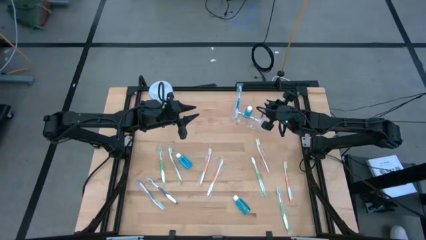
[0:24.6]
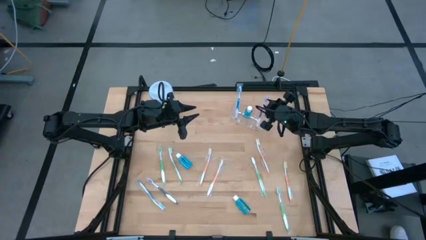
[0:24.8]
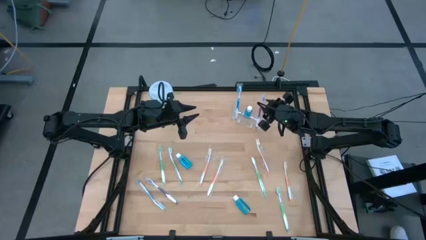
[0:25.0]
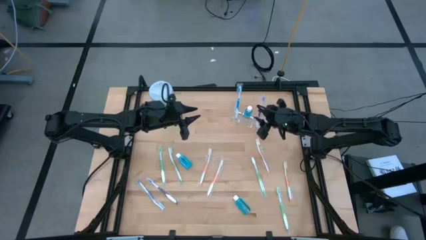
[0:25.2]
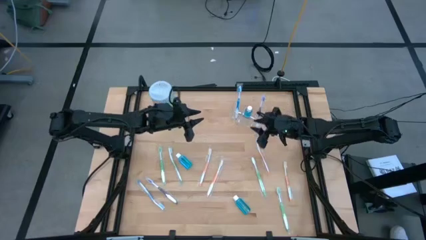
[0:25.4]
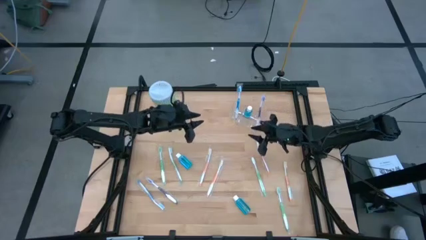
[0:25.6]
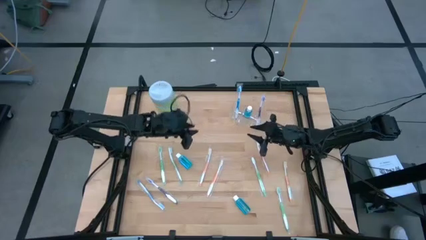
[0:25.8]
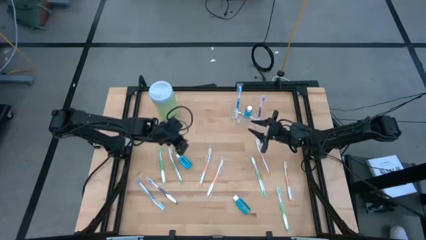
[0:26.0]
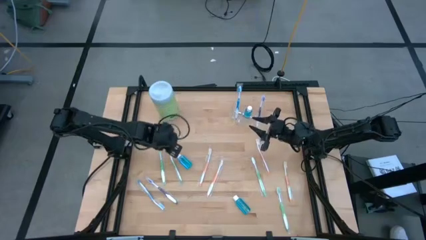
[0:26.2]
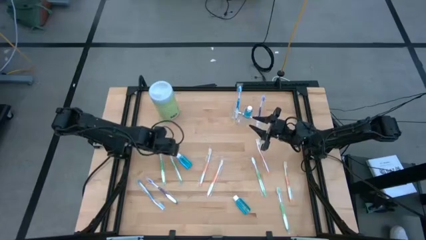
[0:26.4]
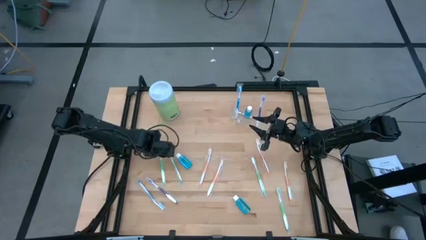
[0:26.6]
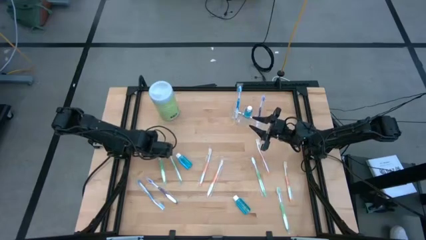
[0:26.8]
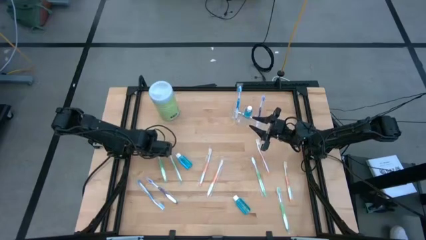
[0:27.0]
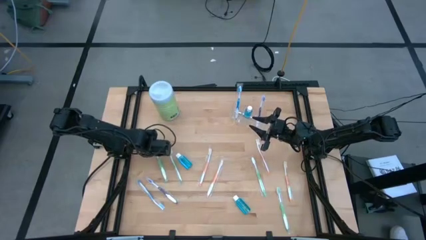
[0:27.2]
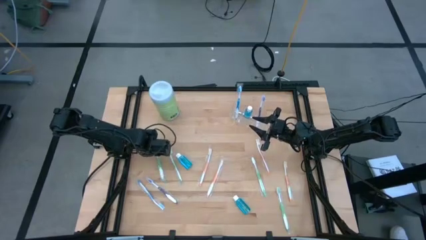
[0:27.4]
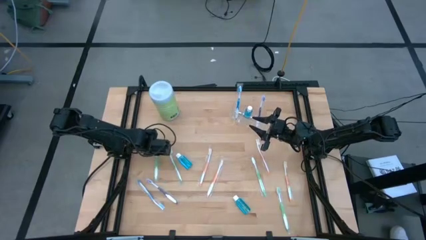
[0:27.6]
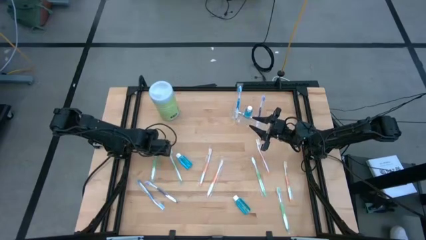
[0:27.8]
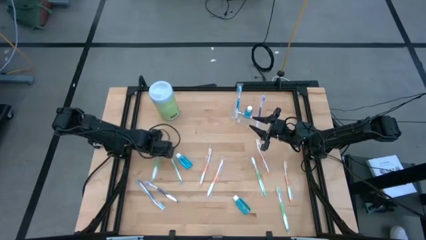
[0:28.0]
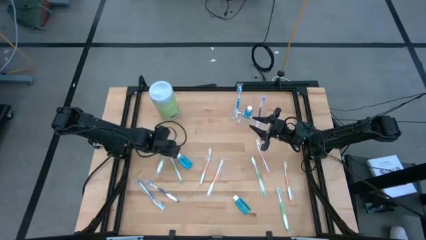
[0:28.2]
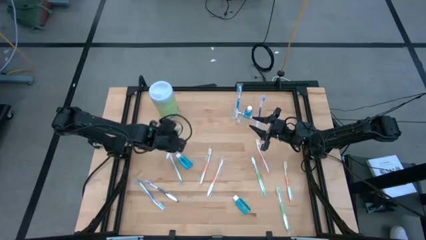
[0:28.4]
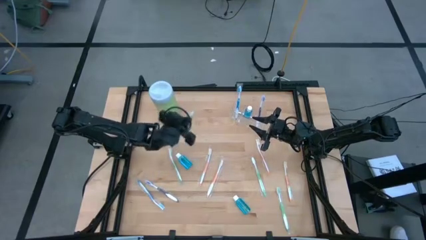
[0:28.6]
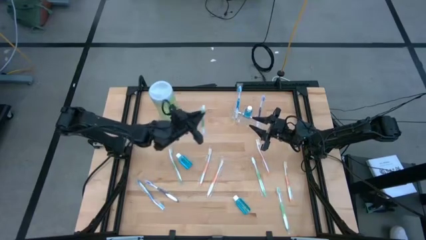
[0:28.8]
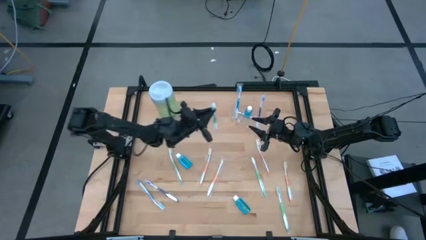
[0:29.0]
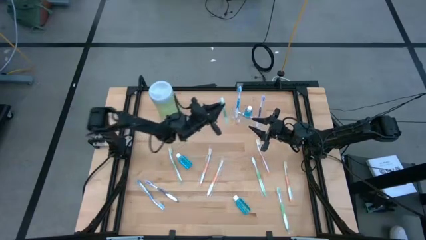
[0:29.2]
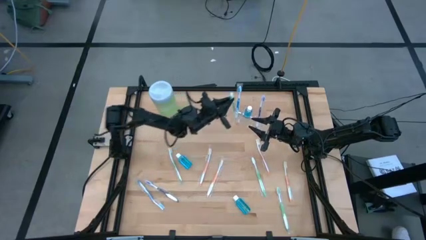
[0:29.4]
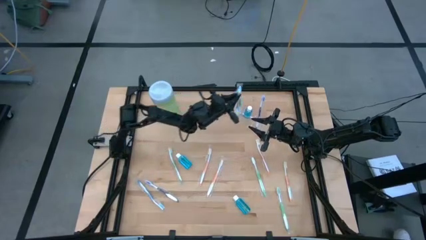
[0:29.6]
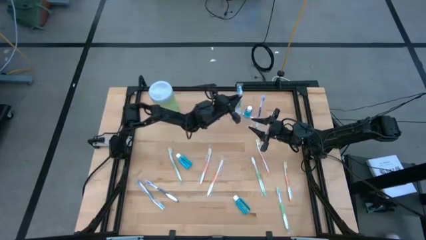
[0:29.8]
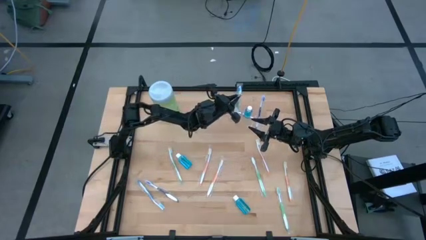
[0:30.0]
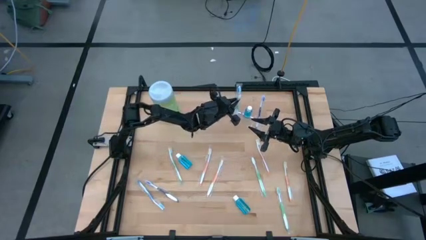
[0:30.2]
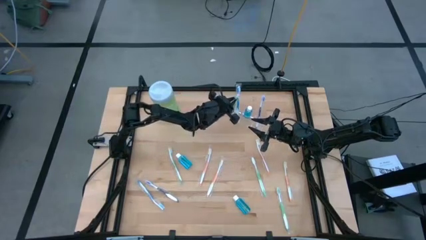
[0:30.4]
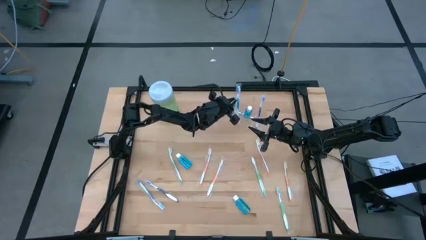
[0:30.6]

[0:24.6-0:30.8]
Task: Pick & Place toothbrushing station
Put the green toothbrush into the transparent organizer

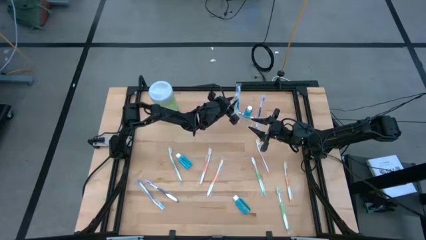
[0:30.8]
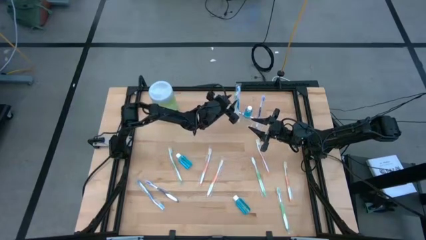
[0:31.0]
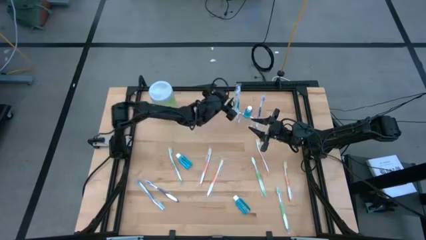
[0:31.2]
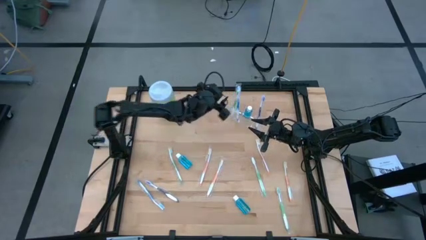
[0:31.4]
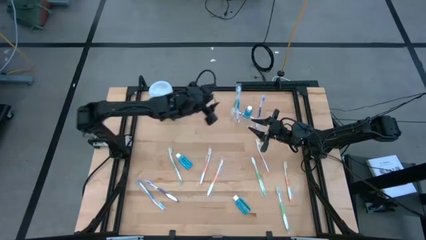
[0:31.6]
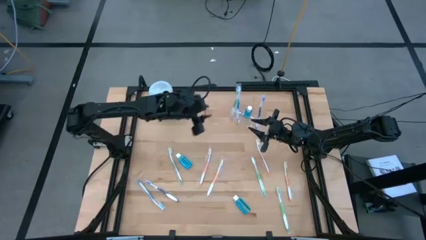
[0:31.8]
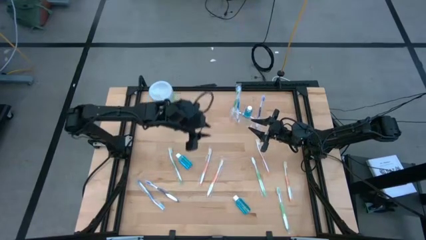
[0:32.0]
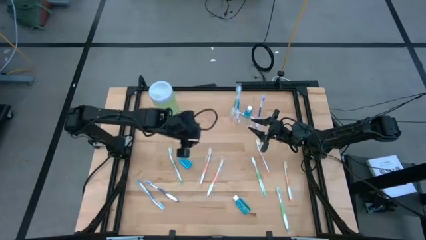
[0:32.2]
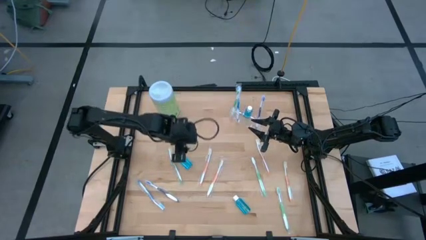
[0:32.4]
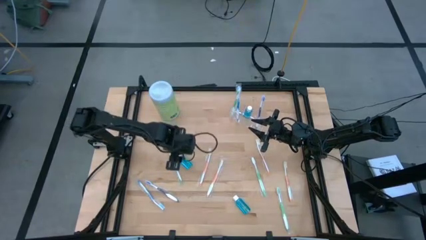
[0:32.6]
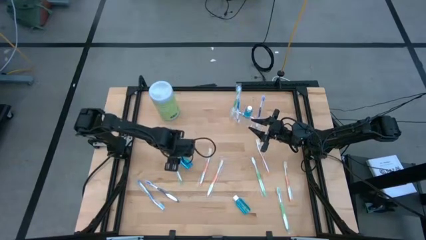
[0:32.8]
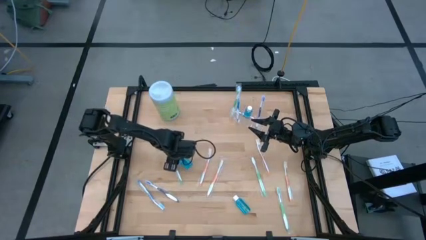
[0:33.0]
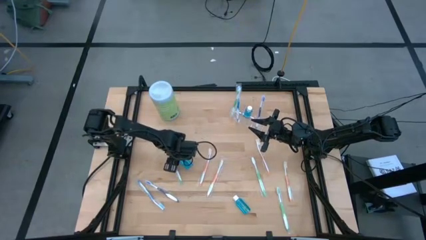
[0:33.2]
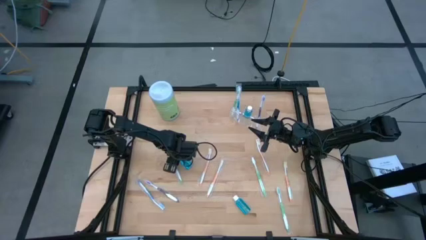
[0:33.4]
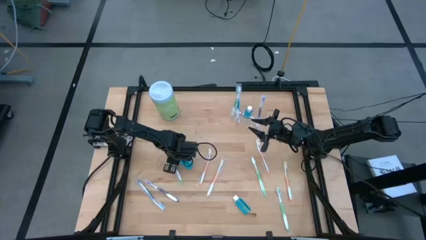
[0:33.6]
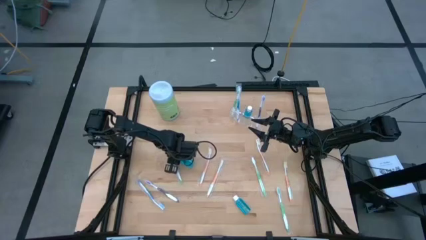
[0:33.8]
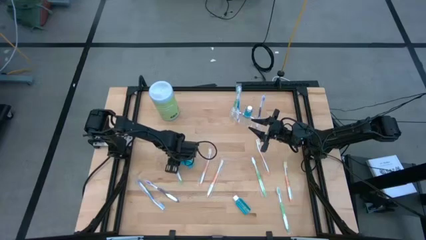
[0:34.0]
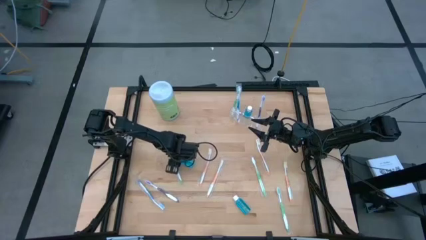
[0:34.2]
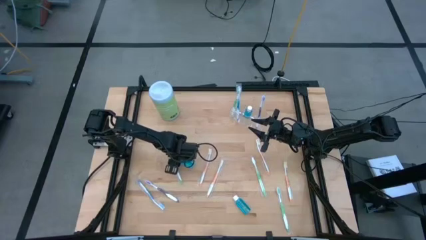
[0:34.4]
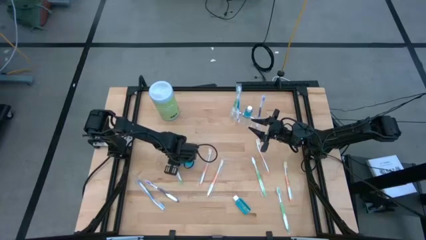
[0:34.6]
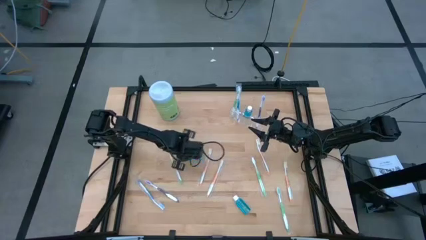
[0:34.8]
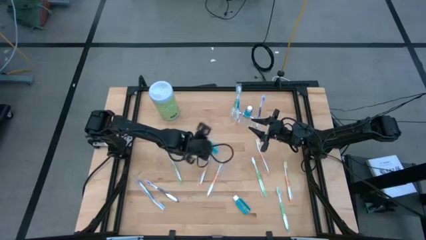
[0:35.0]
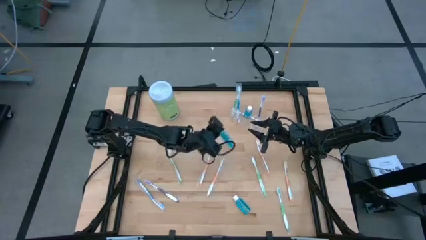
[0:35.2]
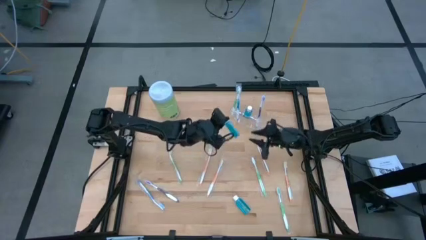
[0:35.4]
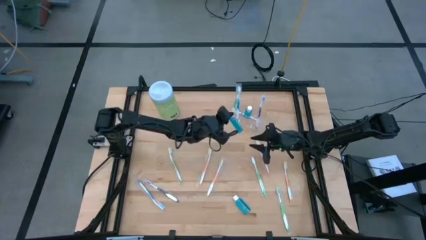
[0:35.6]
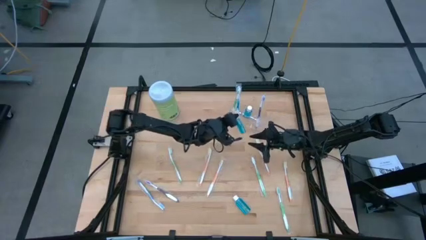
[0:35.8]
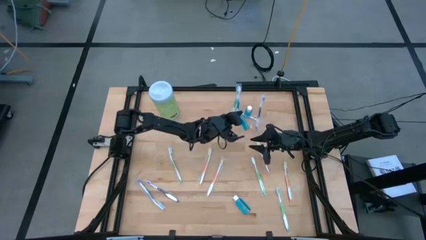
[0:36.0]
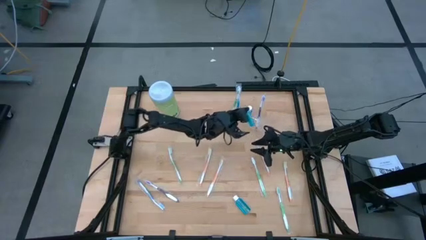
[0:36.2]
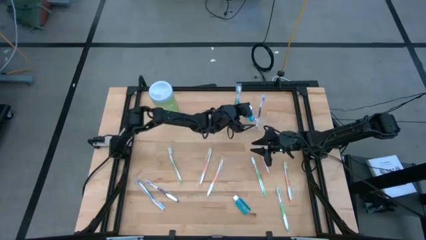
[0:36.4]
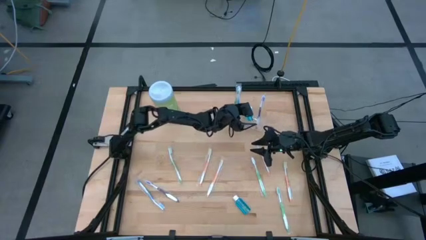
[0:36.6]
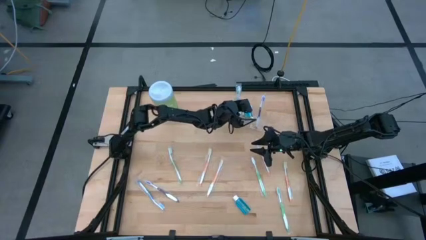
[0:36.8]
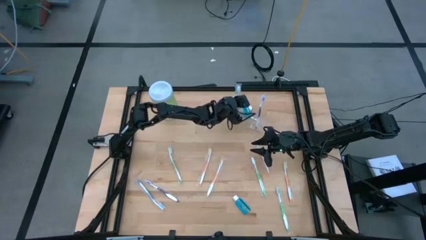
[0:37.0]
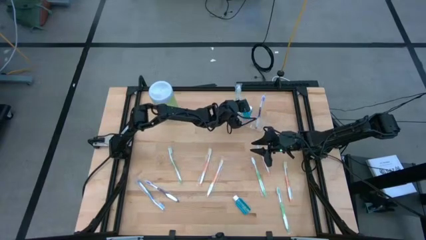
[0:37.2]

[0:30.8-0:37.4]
Put the top blue mouthwash into the transparent organizer

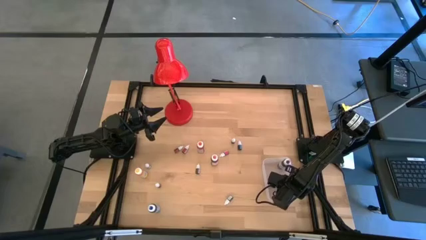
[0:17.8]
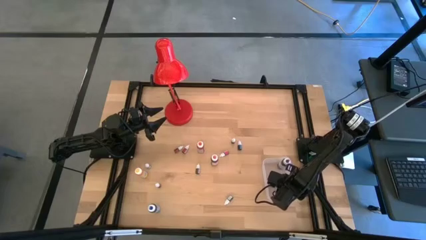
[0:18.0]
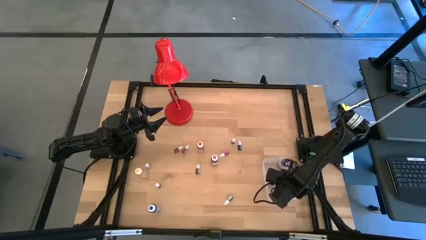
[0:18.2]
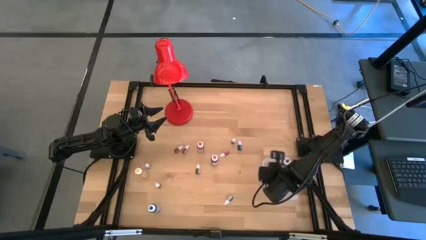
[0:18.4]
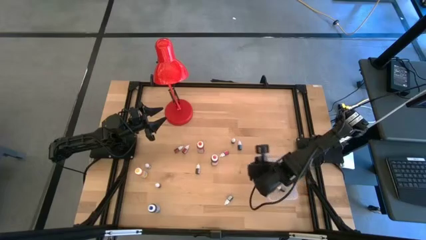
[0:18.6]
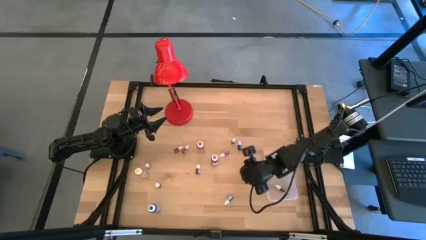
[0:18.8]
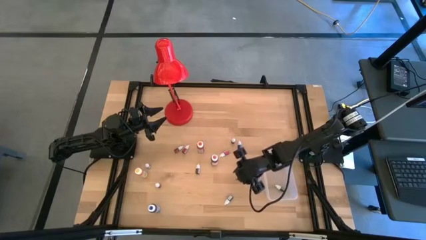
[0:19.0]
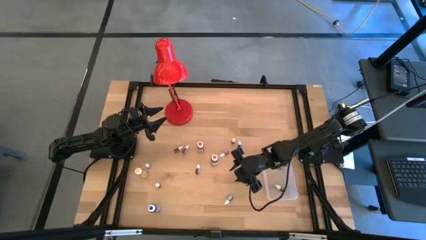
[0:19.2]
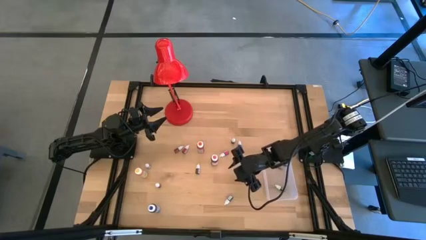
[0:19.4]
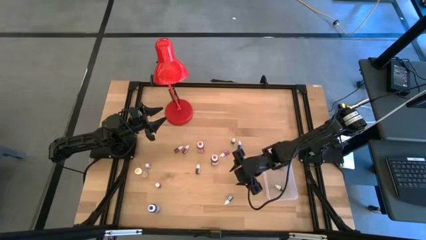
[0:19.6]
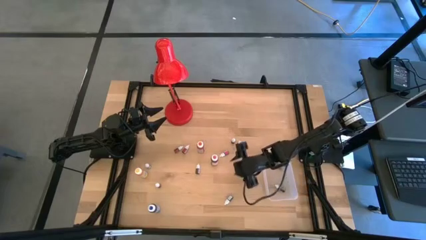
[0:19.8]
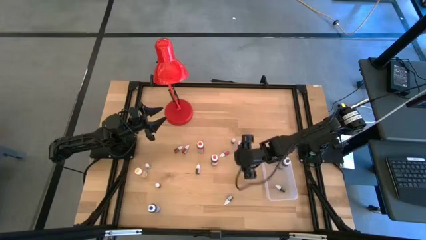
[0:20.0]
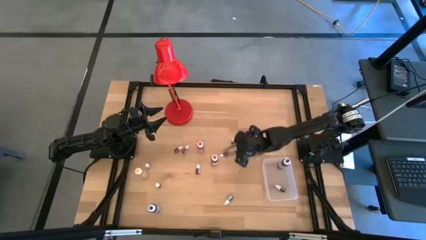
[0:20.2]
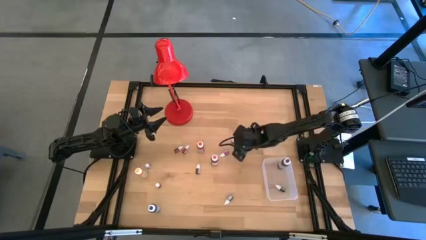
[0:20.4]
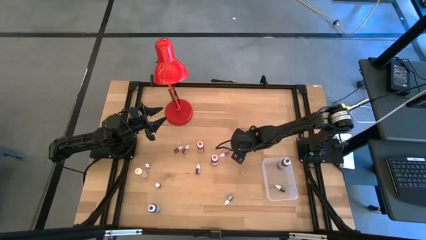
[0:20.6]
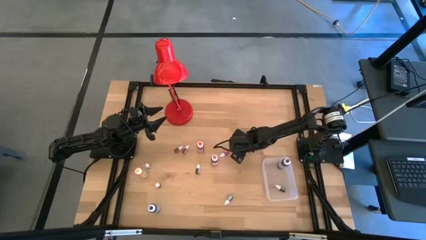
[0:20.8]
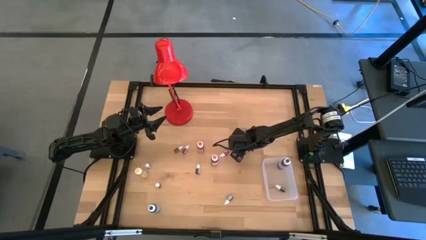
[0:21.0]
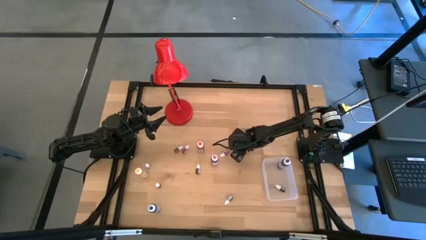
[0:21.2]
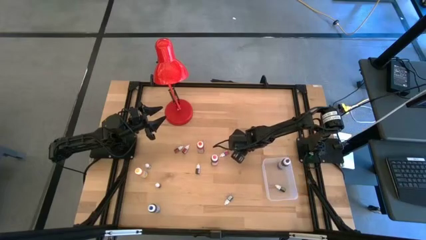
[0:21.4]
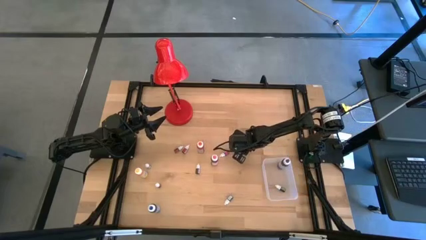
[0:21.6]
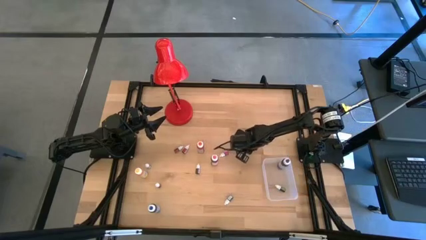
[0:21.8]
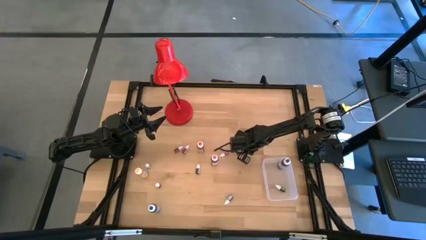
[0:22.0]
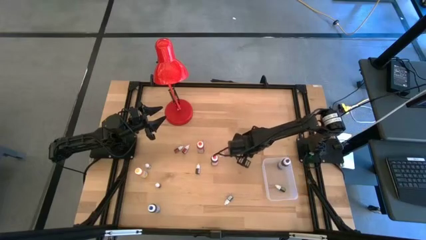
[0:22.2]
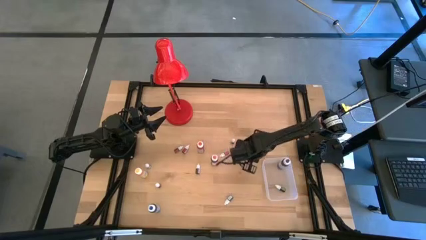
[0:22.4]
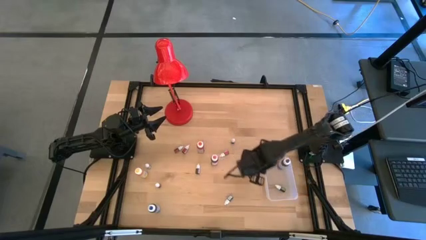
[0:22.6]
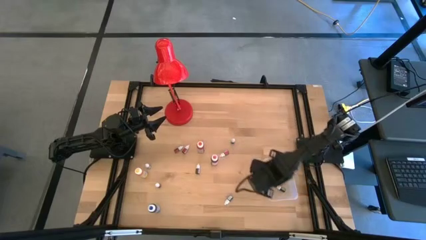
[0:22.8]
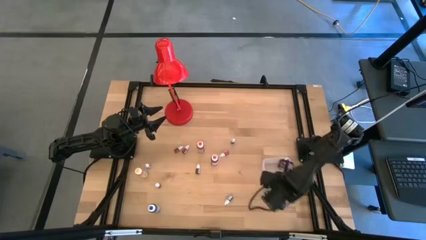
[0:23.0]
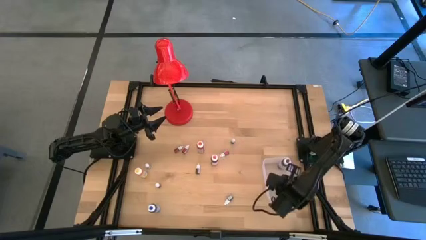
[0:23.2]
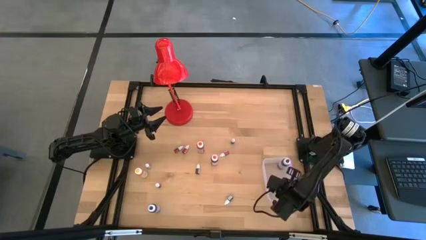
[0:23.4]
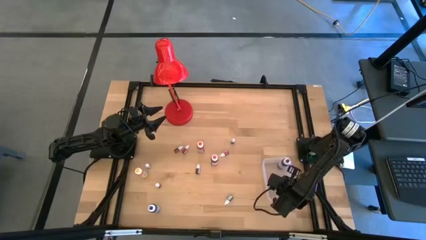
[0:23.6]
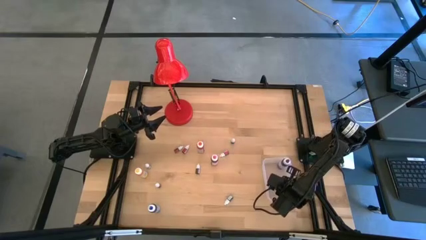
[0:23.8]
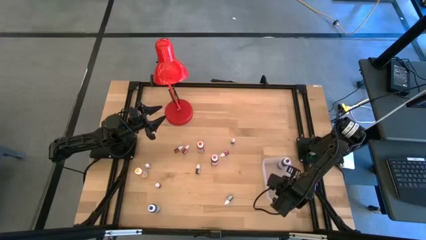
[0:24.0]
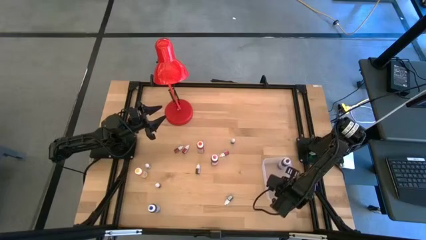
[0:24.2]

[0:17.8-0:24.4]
Task: Pick & Place food coloring
Put the small blue bottle into the transparent container
